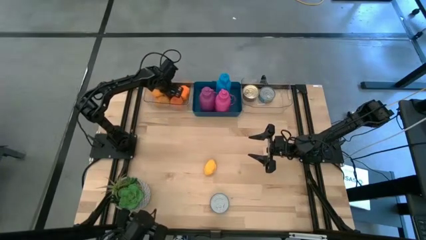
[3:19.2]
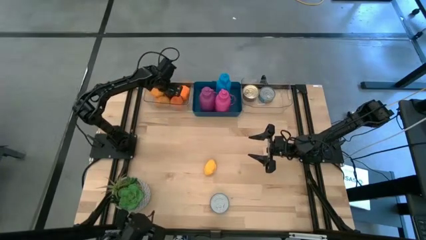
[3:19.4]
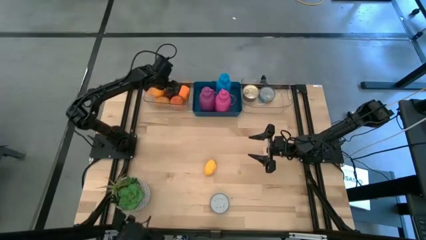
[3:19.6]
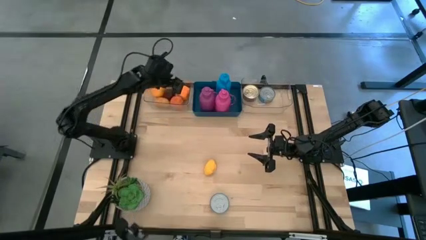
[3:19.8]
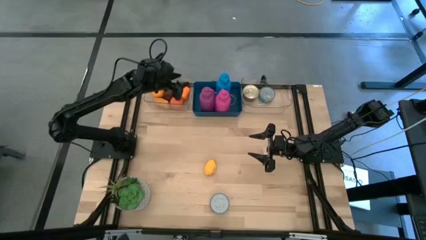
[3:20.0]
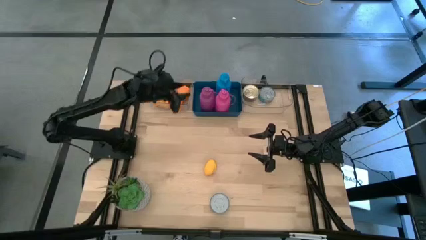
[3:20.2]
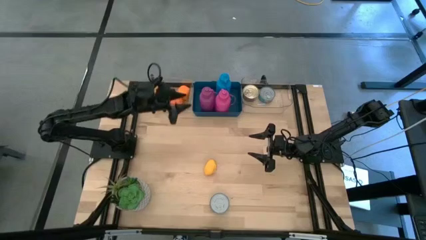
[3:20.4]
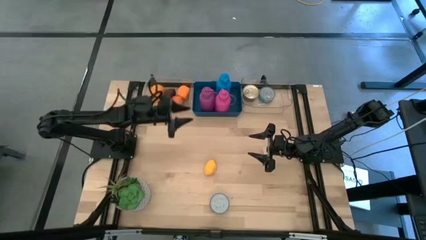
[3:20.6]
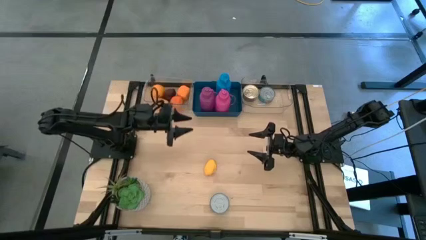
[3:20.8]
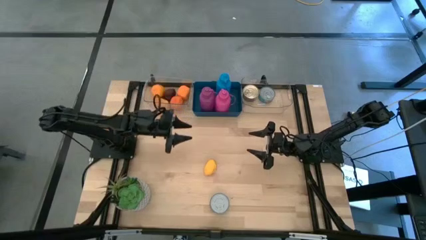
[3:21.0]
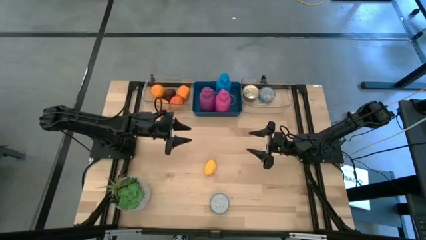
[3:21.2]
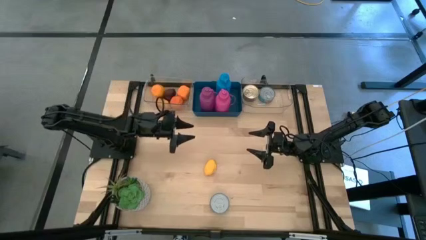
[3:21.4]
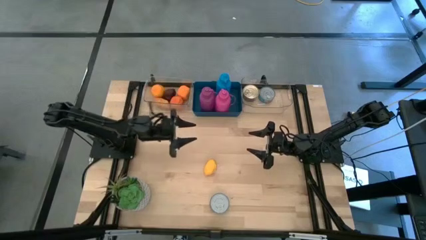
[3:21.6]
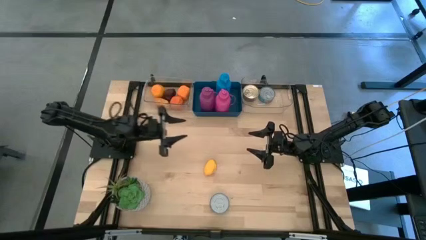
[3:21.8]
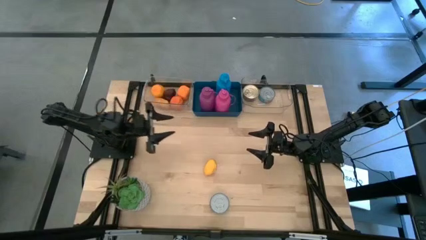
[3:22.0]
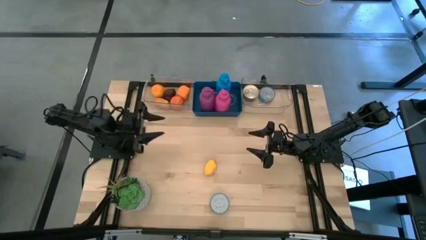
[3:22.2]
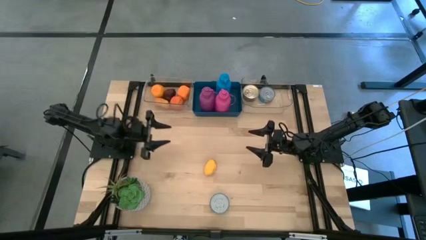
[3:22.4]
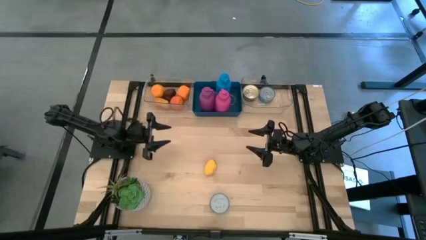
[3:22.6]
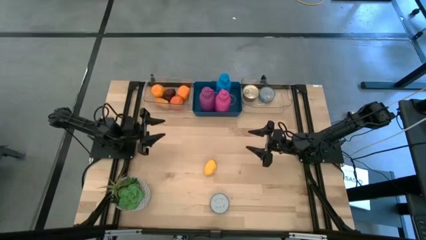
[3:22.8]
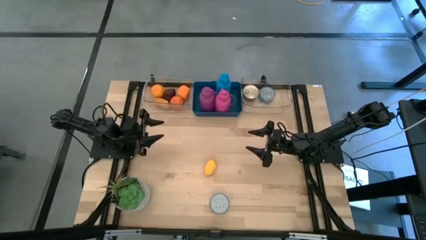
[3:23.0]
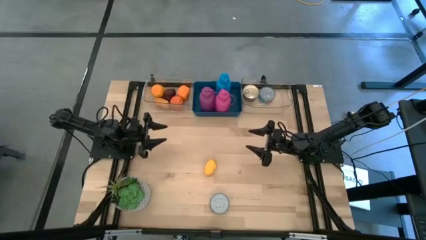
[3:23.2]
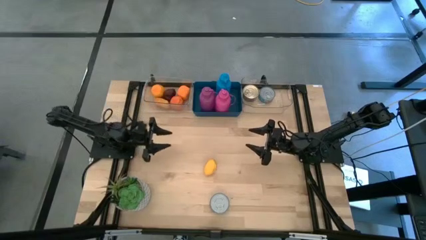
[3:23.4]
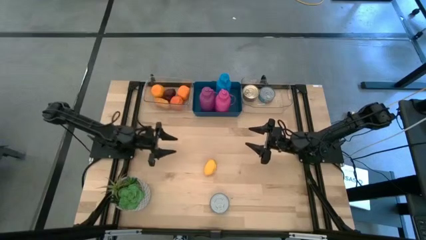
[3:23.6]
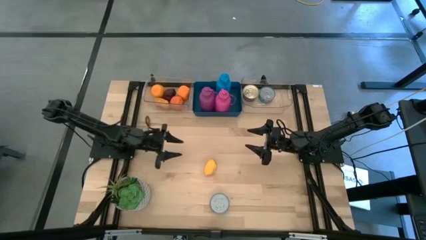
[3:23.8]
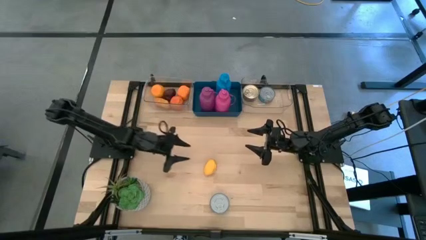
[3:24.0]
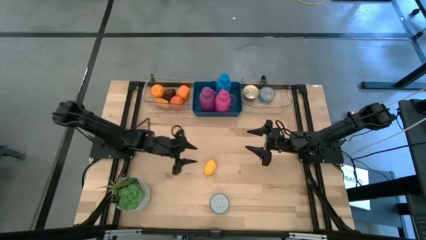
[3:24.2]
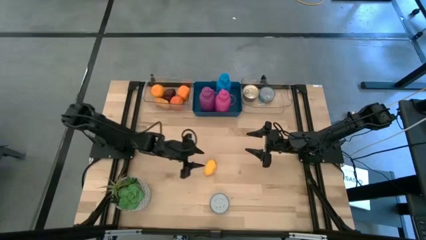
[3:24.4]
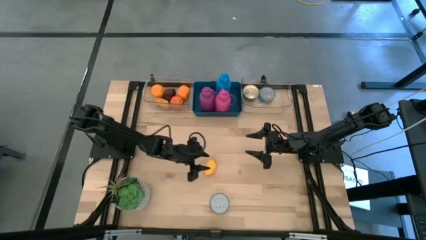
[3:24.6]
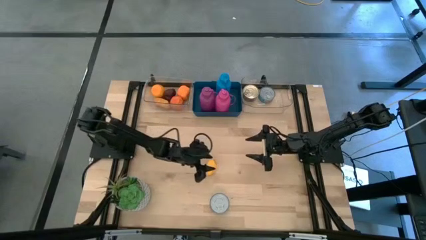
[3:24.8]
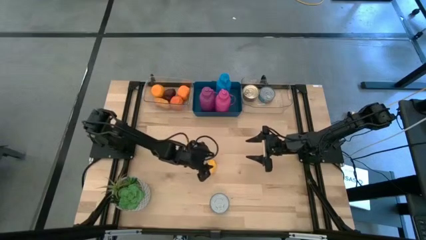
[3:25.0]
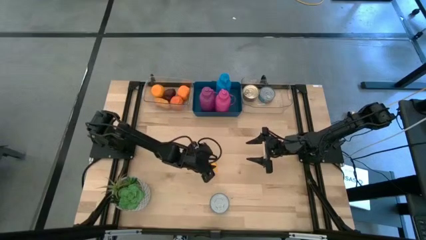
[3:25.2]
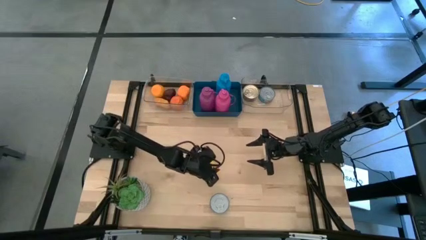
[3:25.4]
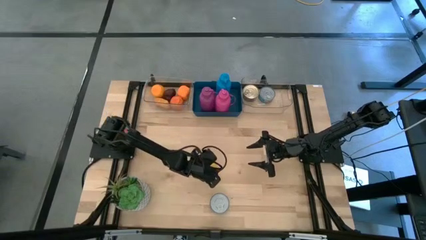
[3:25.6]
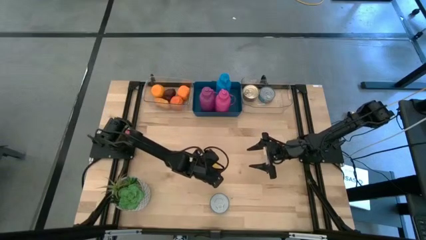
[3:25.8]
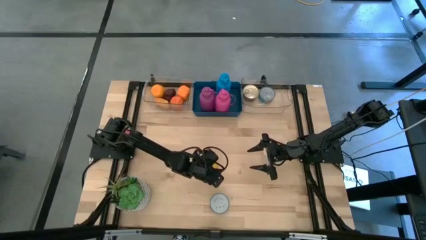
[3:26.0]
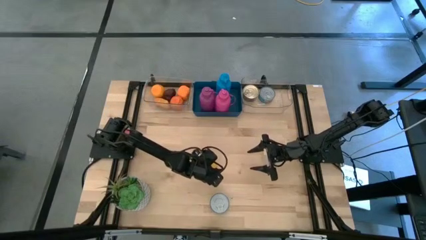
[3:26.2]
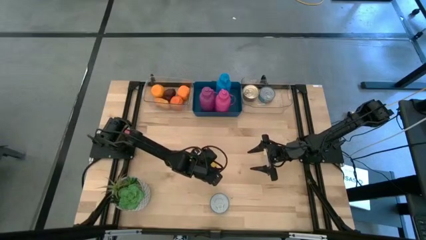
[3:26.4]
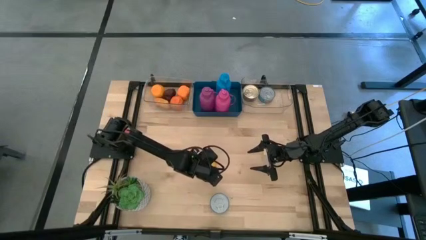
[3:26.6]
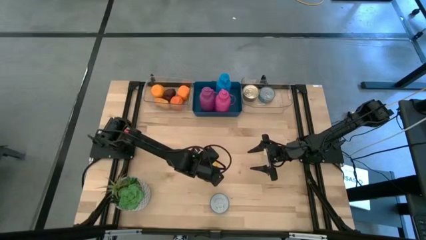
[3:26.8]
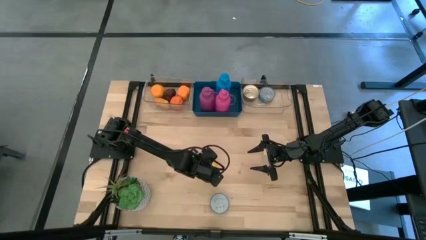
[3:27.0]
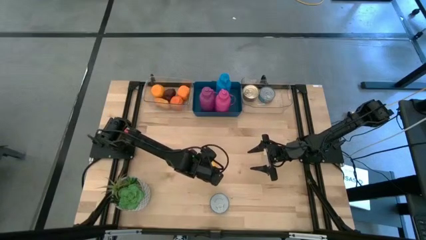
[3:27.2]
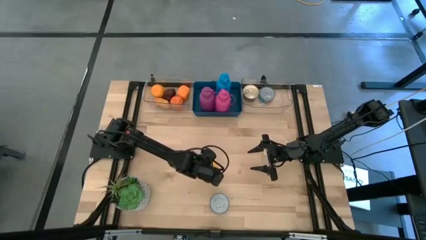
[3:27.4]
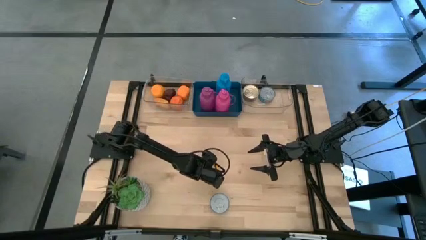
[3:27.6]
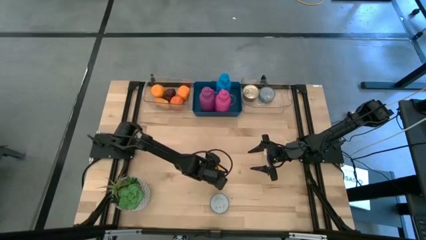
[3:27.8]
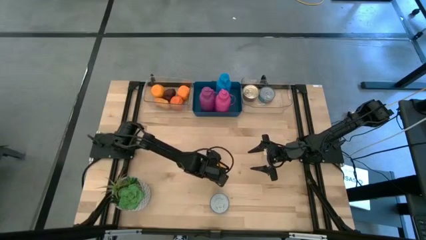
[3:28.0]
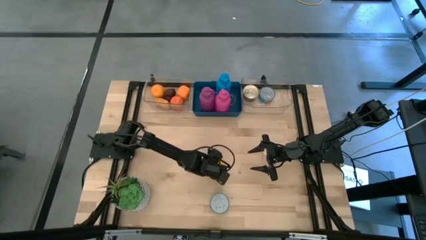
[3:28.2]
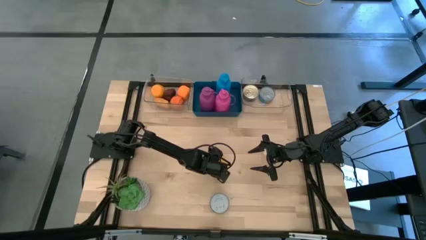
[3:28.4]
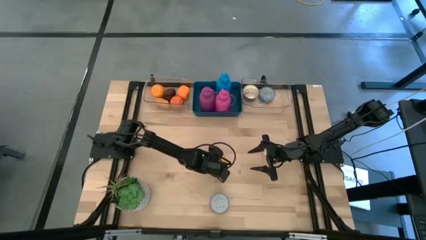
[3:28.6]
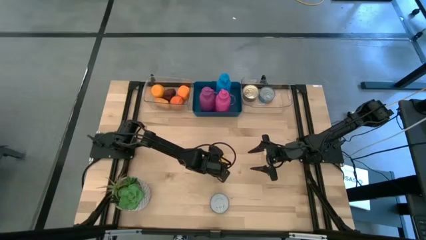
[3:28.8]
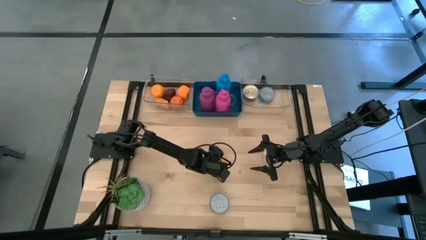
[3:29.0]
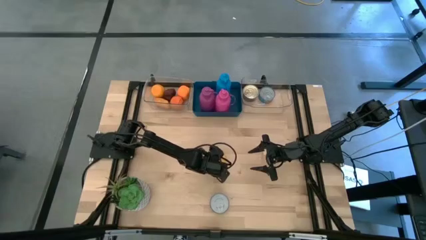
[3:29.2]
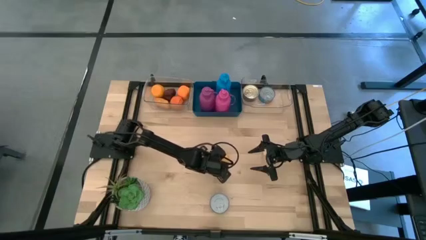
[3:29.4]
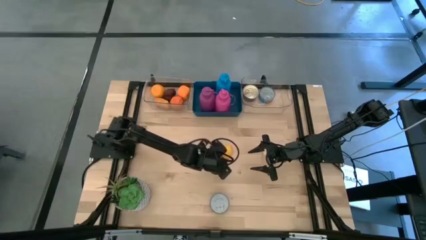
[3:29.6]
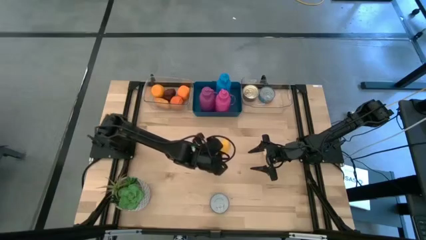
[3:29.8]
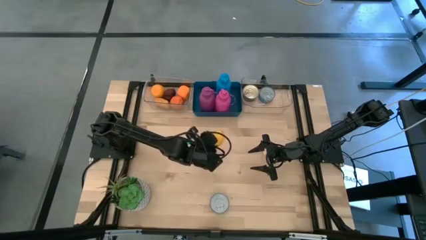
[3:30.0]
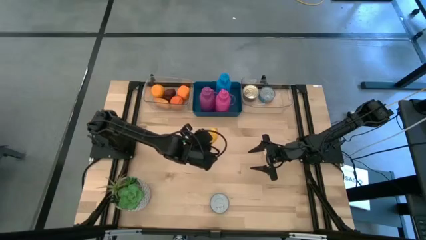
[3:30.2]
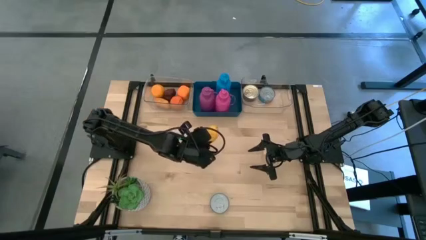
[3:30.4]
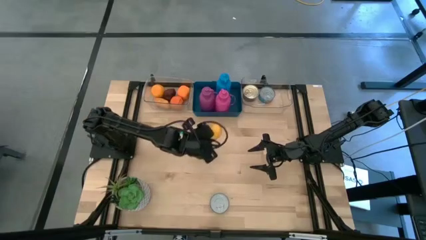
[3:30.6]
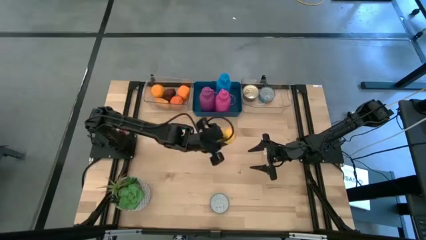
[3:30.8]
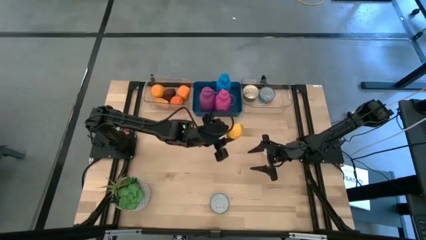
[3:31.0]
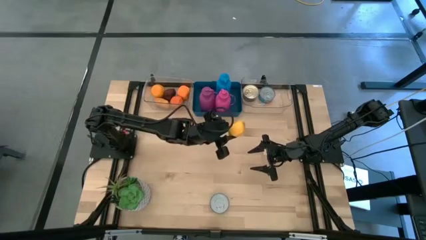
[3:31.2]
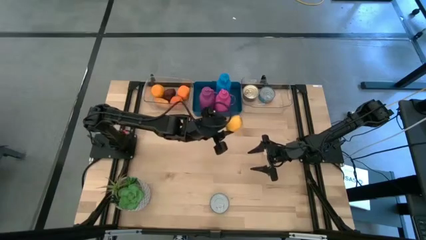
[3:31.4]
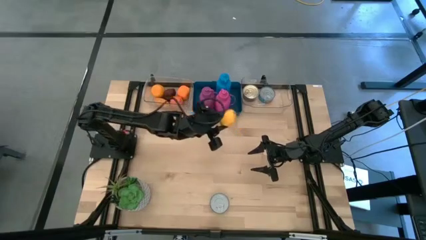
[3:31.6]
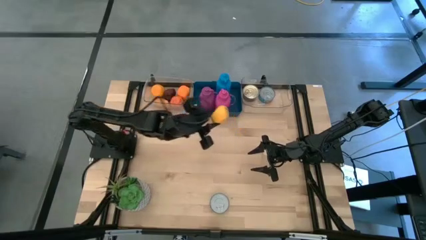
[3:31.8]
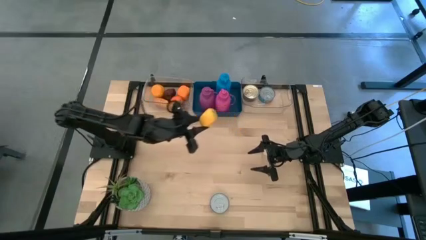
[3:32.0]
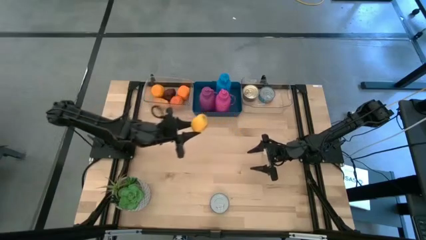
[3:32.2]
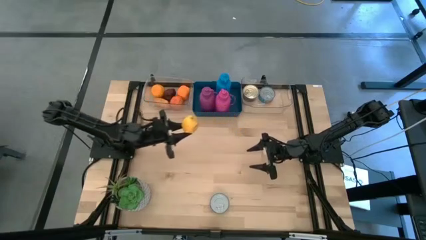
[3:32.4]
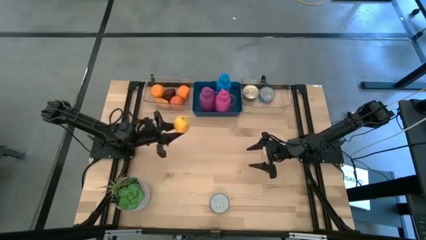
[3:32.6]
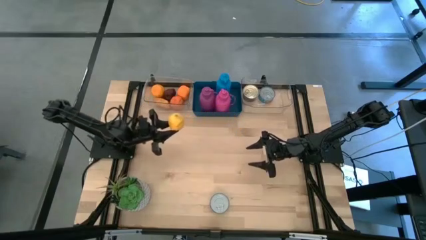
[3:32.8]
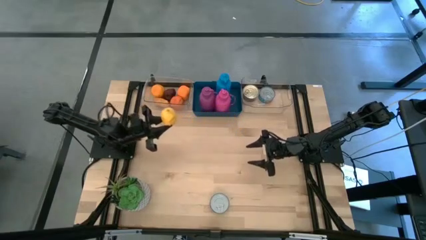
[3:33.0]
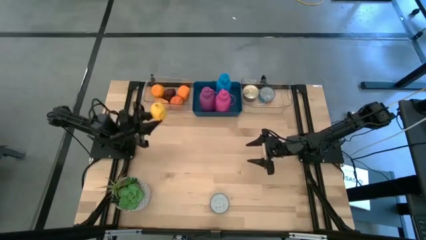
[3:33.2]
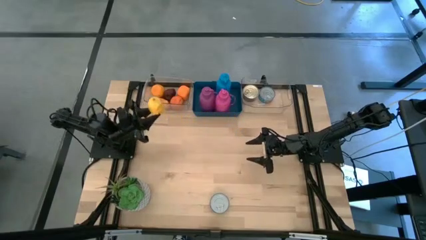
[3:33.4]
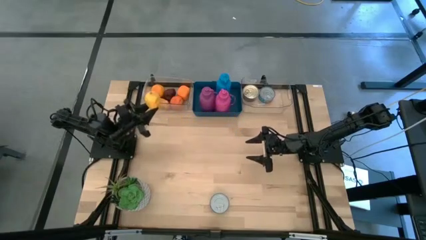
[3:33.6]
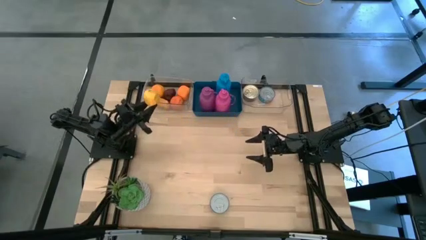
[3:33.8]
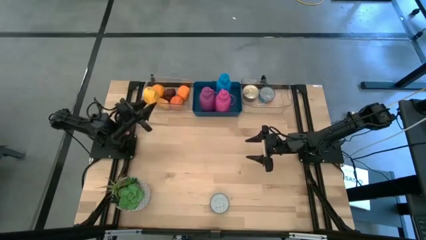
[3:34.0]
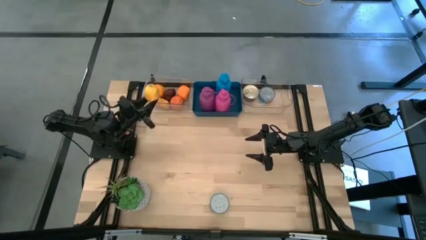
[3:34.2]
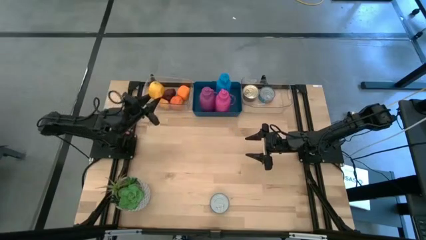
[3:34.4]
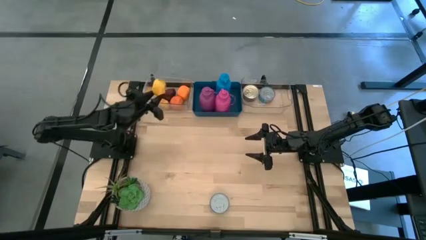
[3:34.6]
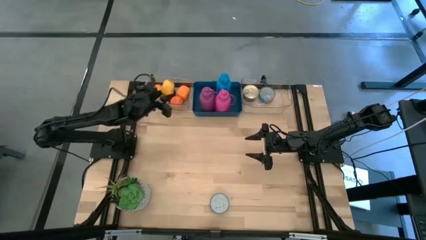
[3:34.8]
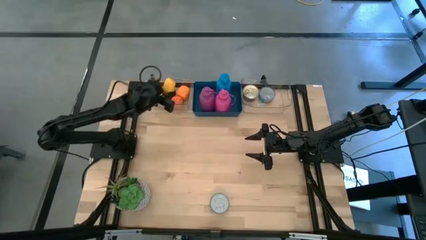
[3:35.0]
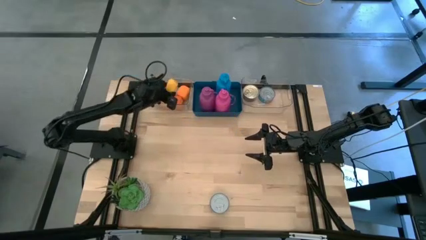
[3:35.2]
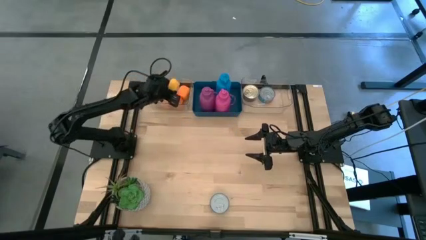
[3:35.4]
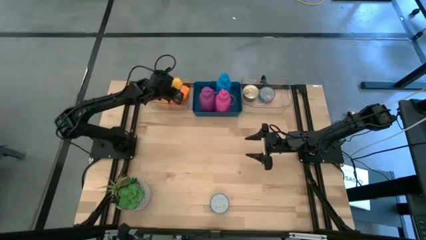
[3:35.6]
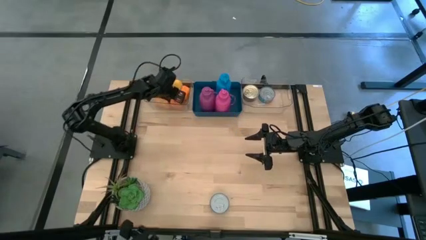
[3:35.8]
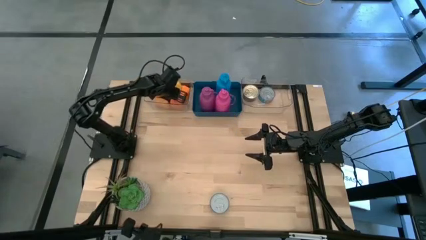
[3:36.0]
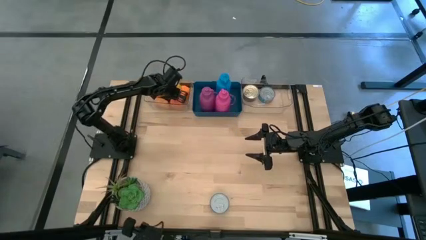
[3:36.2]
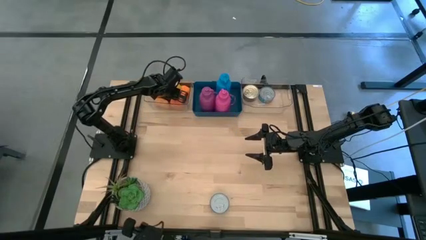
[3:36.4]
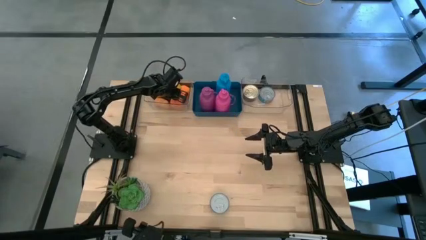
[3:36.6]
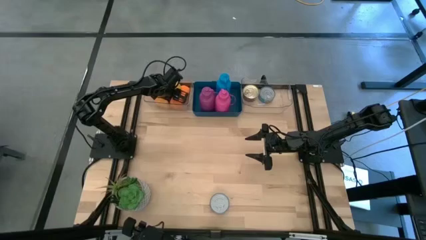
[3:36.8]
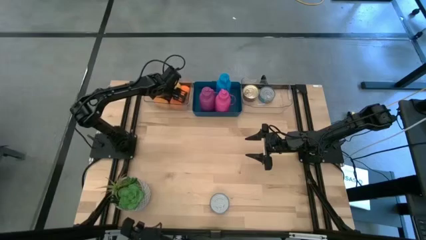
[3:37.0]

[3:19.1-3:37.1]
Task: Pick & Place Food Item
Put the lemon into the left transparent bin
